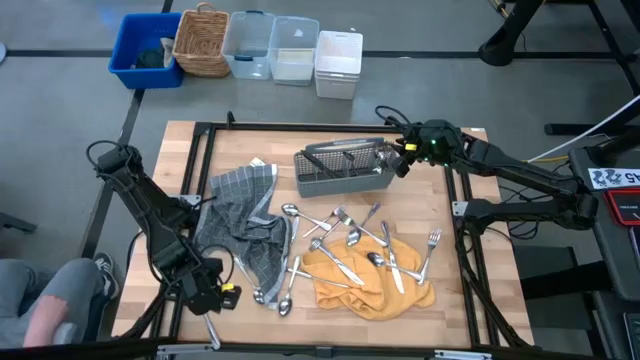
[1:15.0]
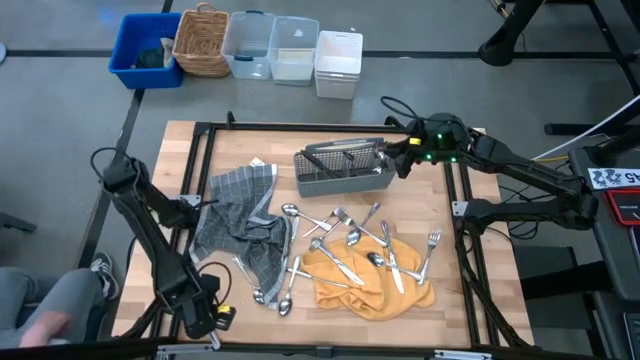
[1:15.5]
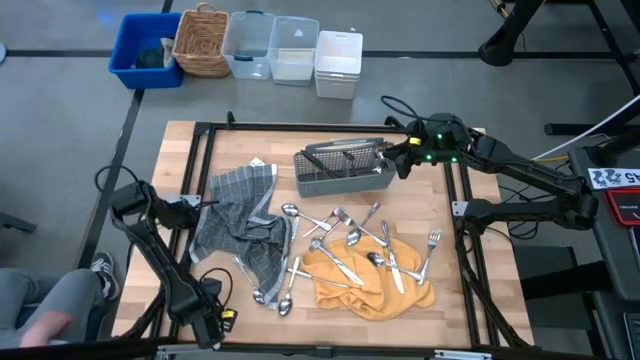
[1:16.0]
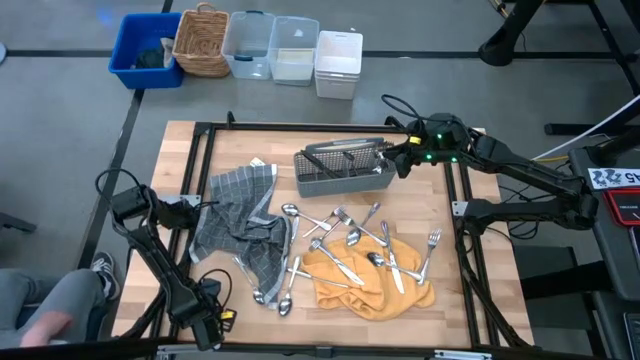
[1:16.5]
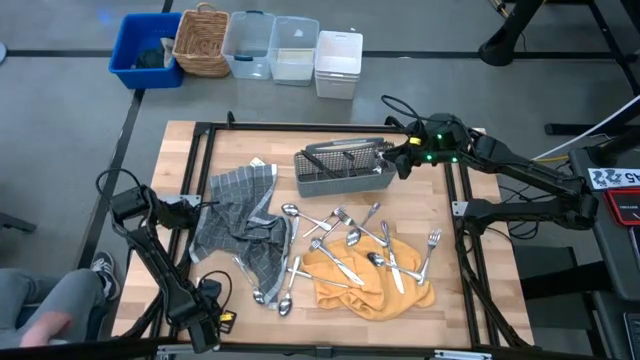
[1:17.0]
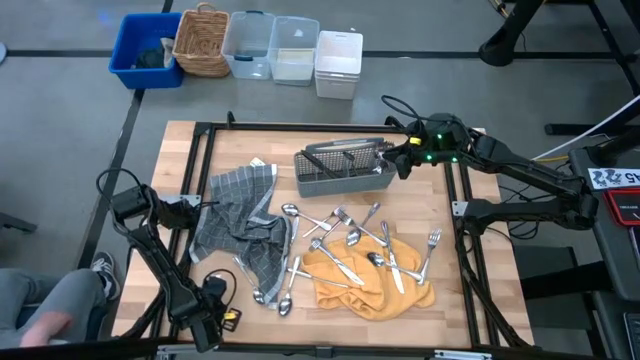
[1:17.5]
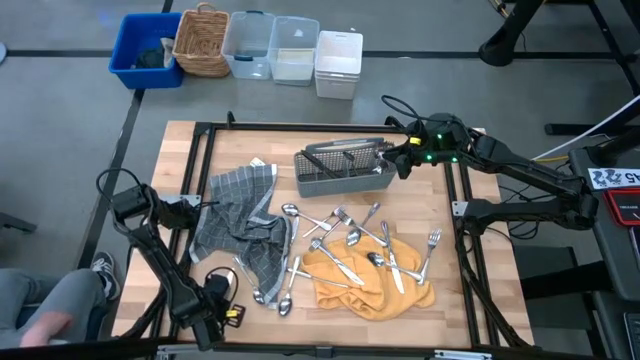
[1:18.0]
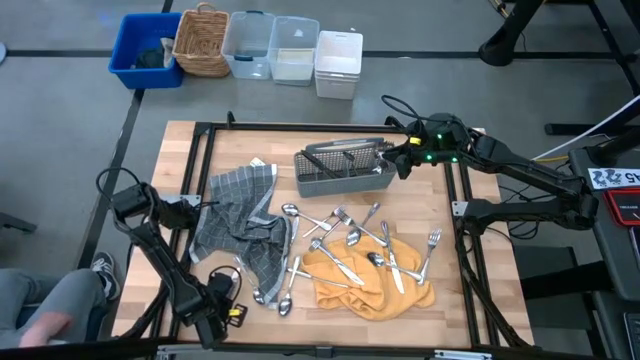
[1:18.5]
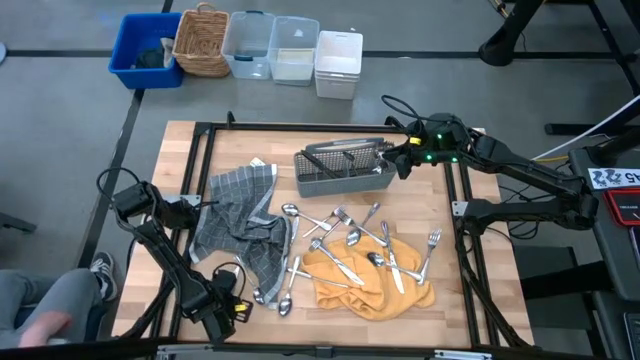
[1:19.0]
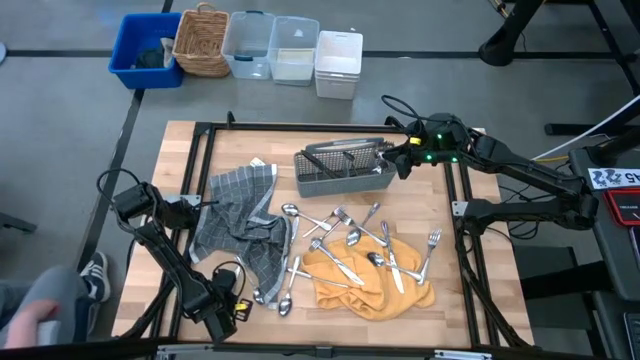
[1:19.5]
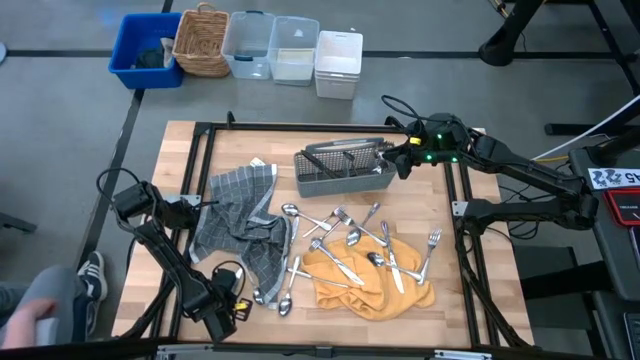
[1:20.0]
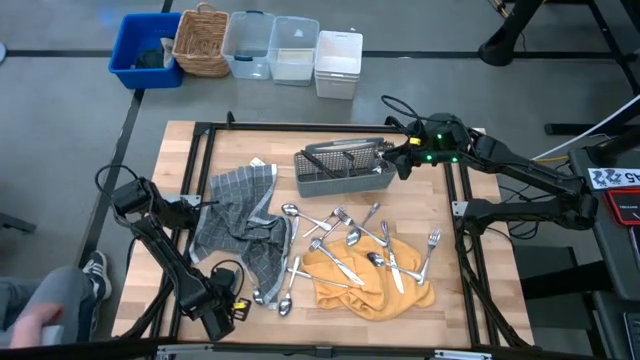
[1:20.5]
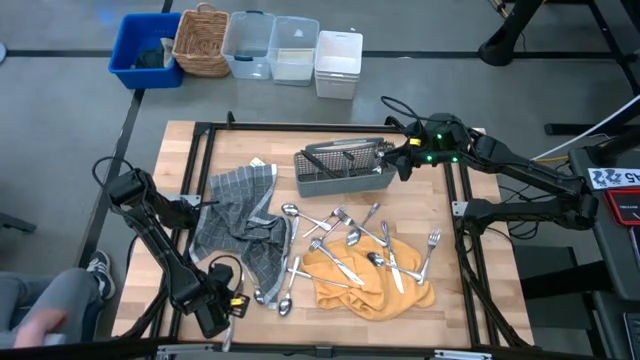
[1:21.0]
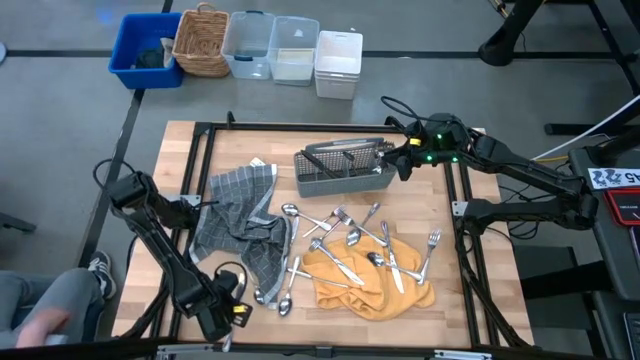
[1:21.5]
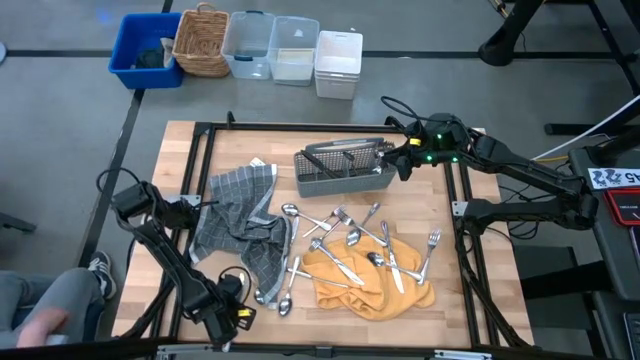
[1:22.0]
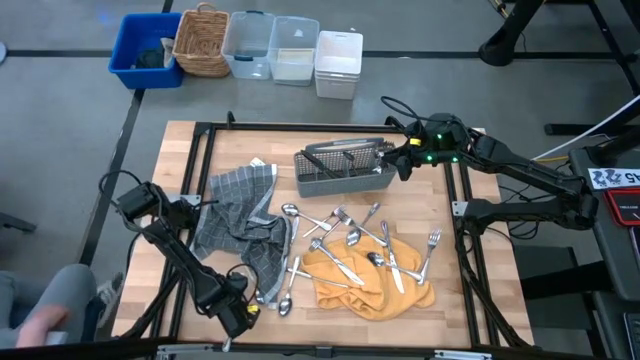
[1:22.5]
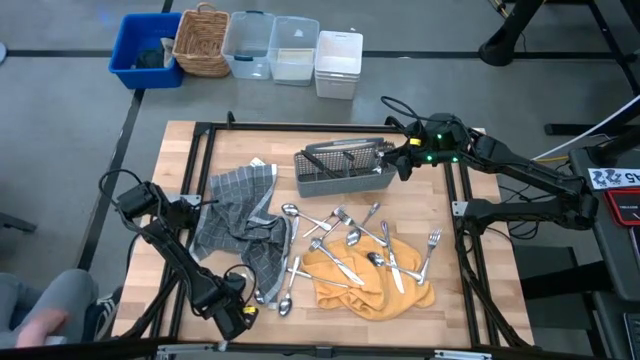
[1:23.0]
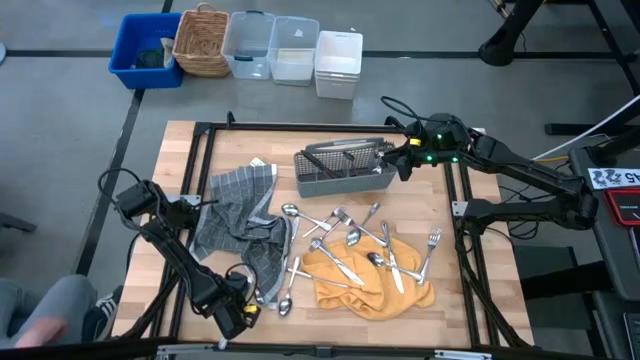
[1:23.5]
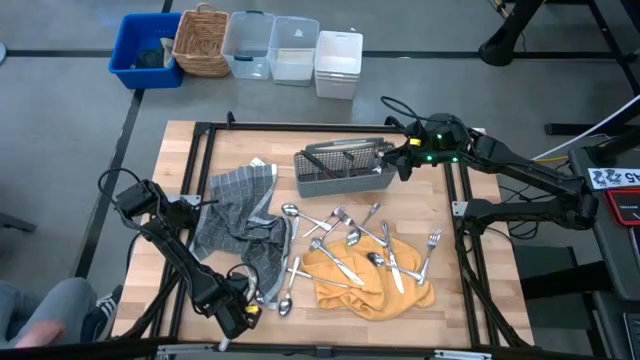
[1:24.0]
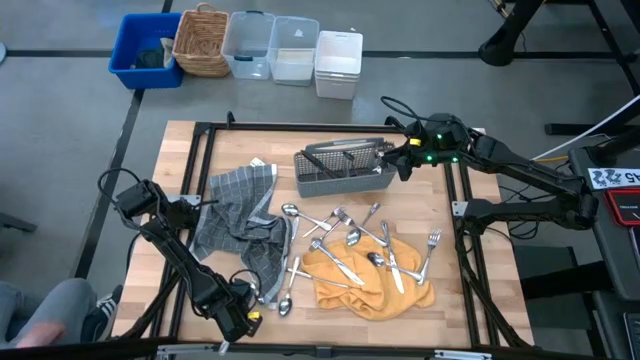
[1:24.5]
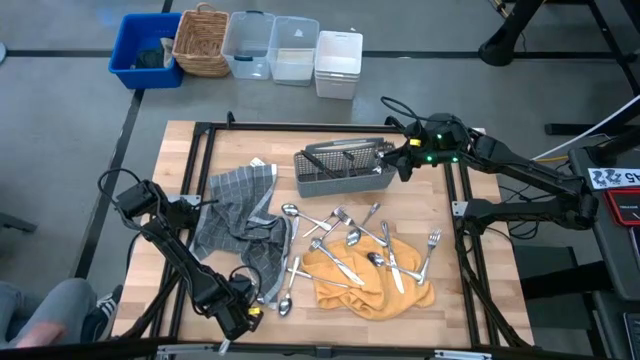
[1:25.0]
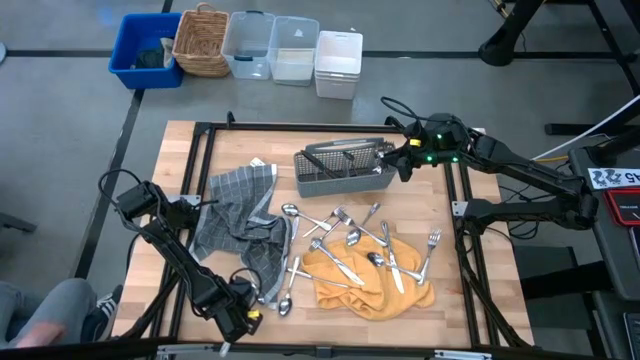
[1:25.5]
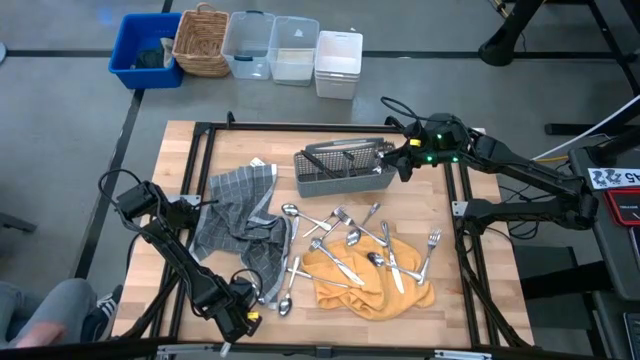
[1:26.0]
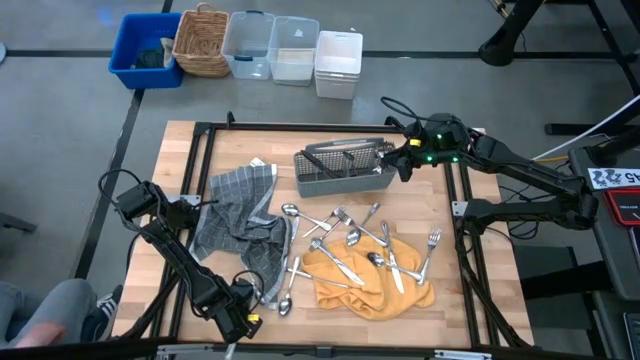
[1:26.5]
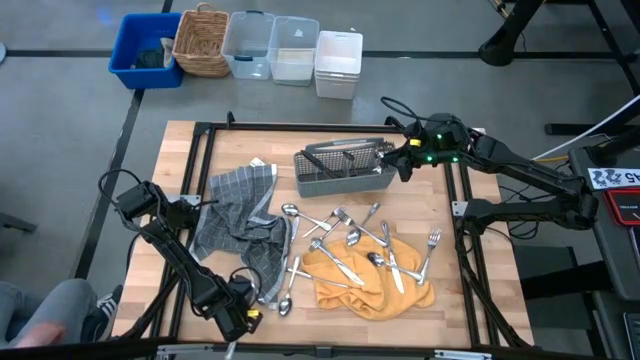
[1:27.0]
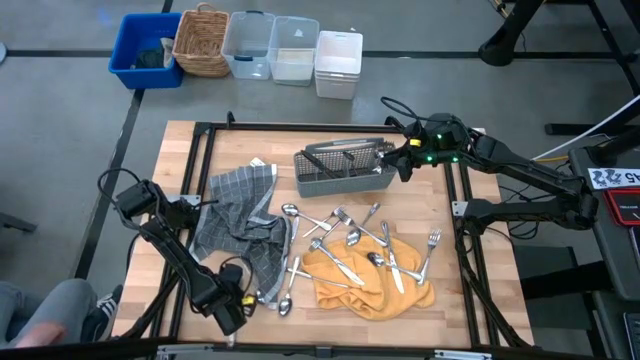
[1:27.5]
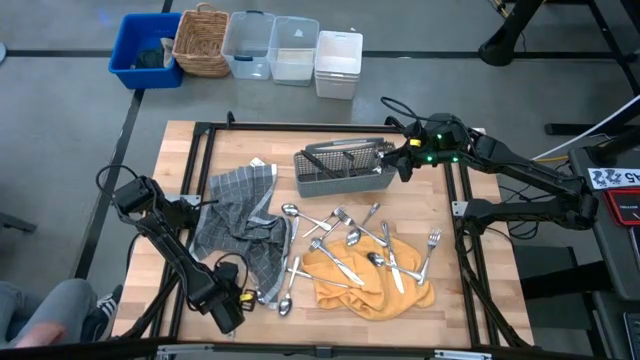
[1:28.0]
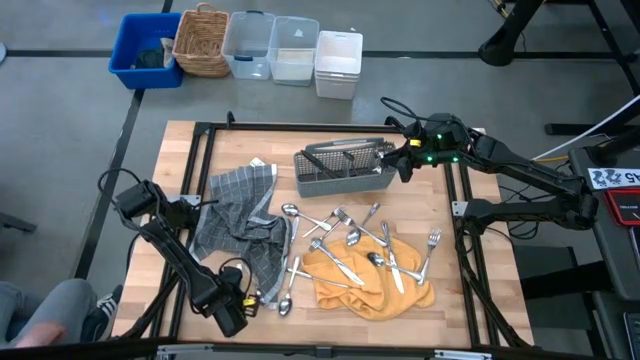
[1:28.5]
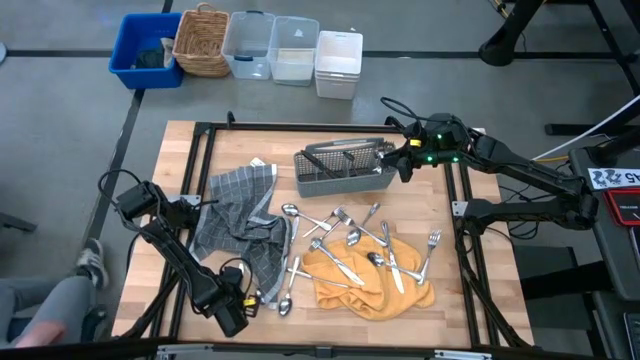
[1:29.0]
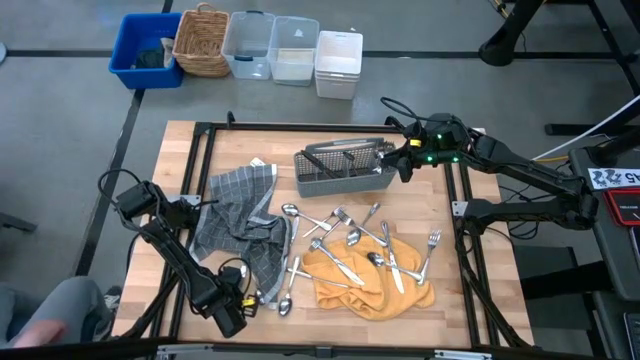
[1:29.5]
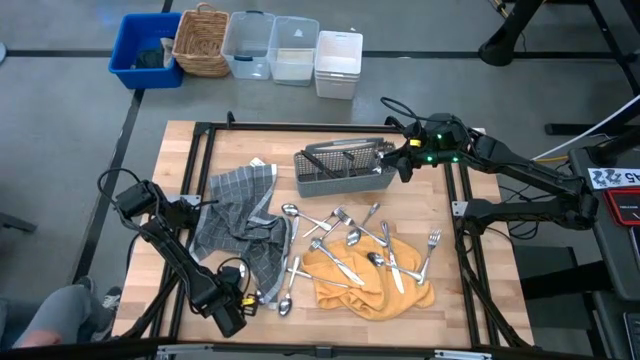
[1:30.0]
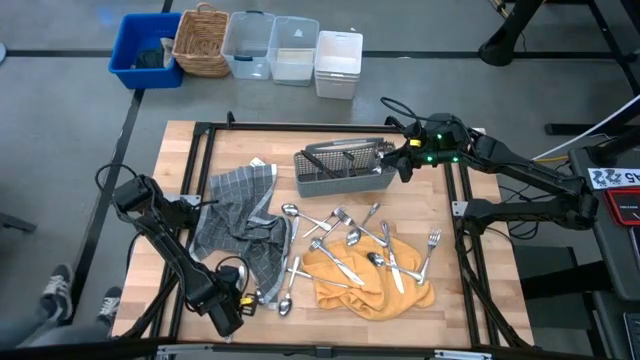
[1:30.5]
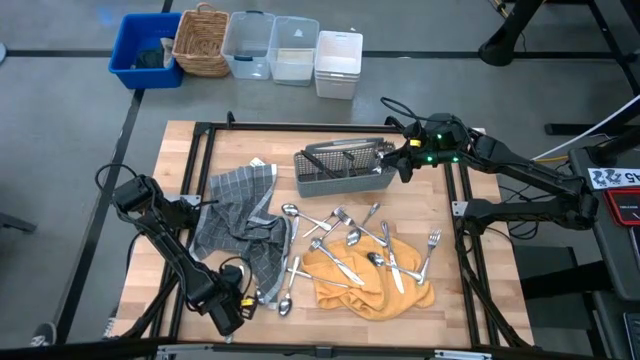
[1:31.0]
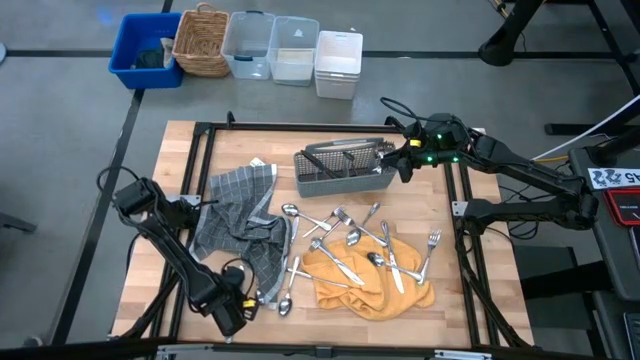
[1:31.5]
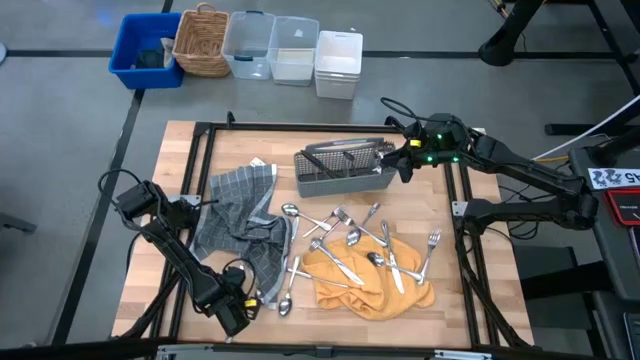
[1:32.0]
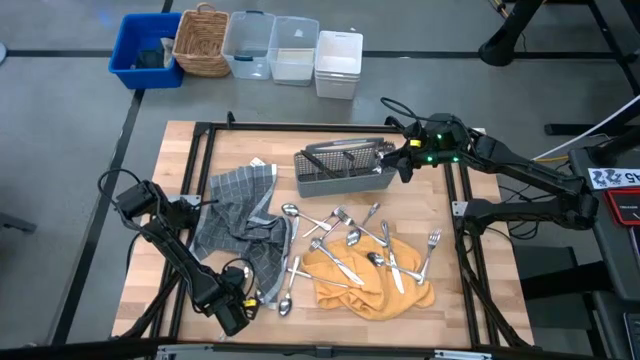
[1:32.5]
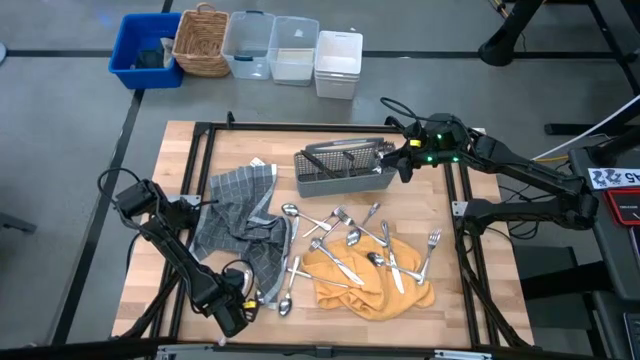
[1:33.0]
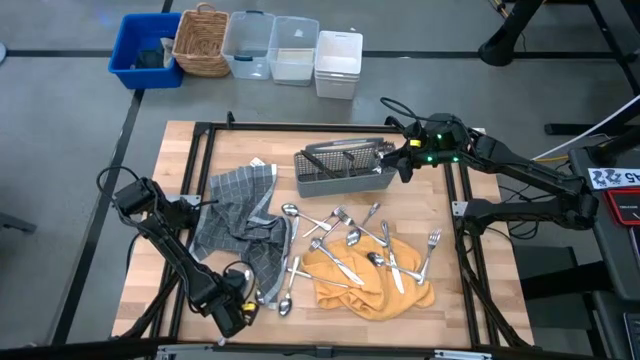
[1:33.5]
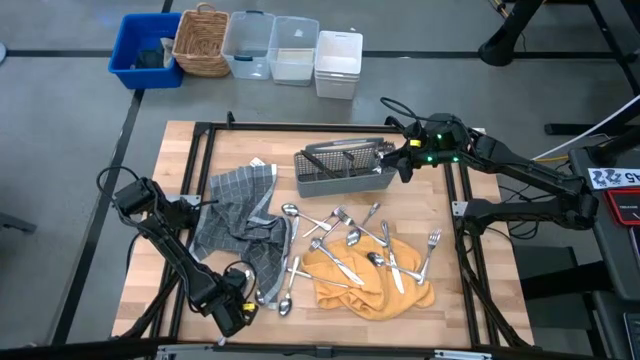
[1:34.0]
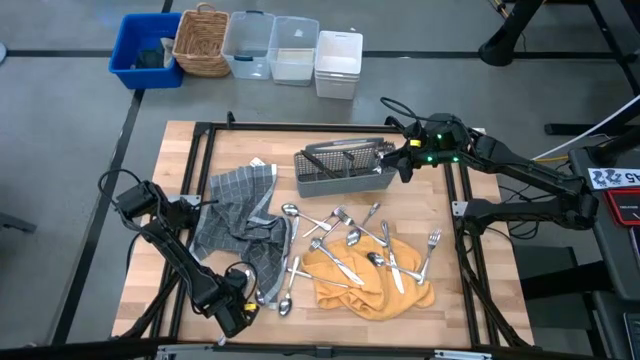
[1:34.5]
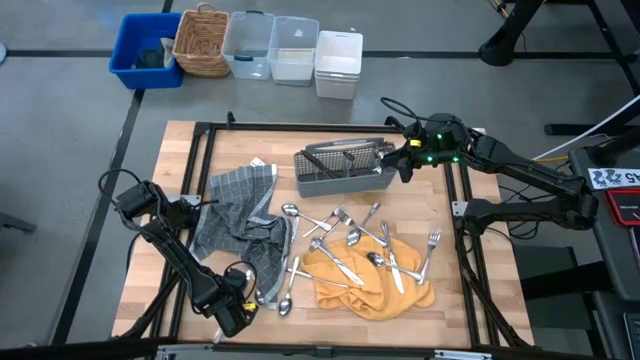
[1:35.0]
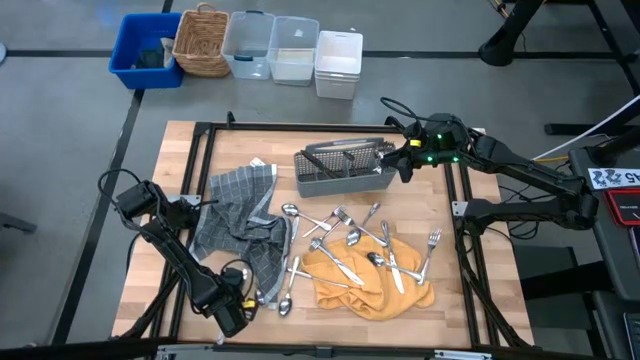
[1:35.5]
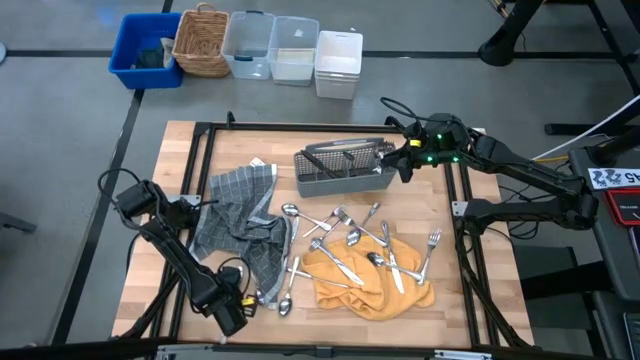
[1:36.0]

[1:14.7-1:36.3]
Task: Sort silverware
Put the silver knife into the gray utensil holder
